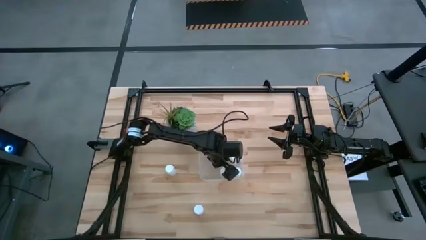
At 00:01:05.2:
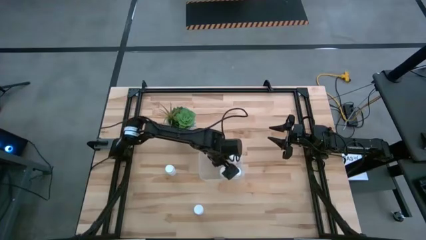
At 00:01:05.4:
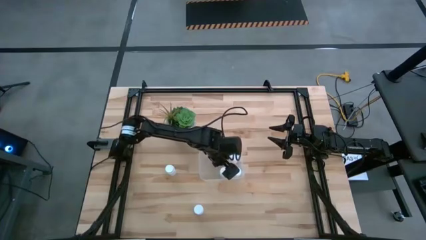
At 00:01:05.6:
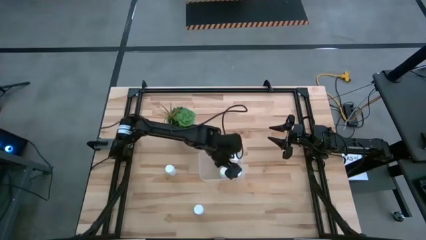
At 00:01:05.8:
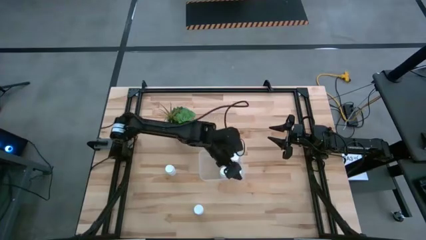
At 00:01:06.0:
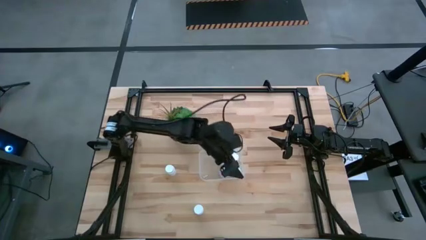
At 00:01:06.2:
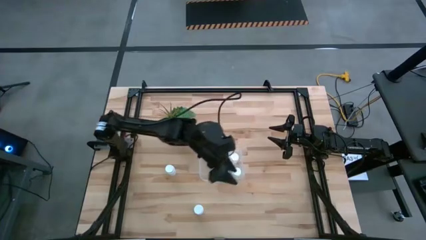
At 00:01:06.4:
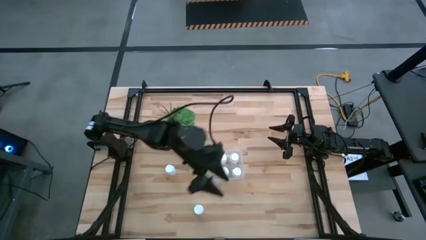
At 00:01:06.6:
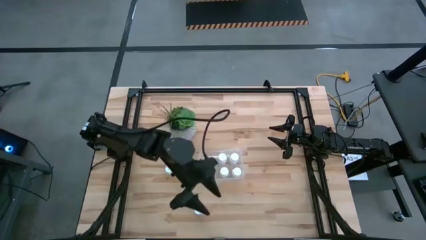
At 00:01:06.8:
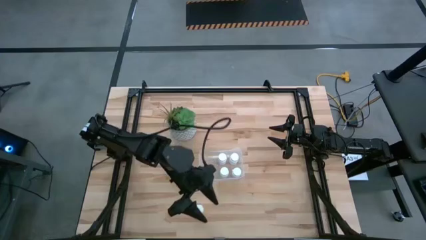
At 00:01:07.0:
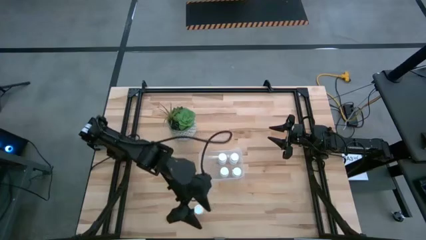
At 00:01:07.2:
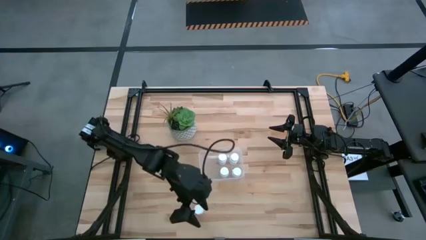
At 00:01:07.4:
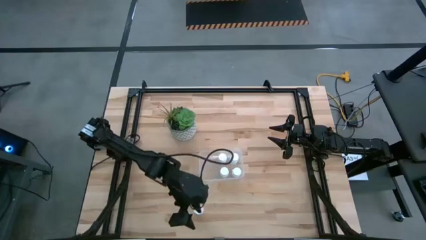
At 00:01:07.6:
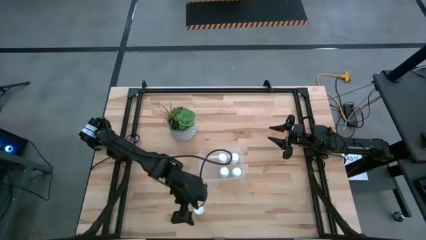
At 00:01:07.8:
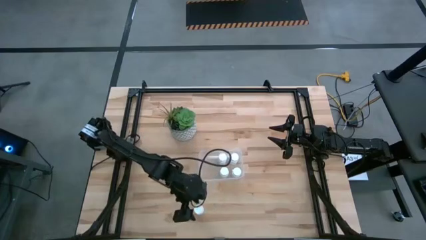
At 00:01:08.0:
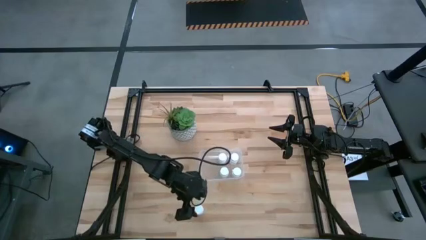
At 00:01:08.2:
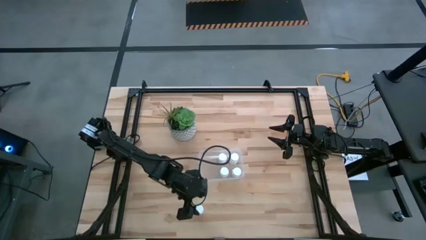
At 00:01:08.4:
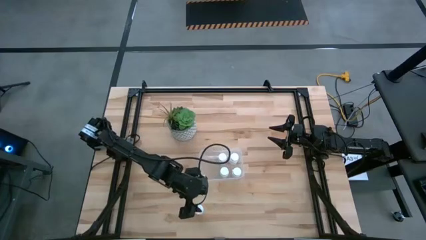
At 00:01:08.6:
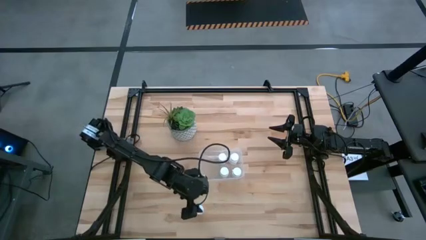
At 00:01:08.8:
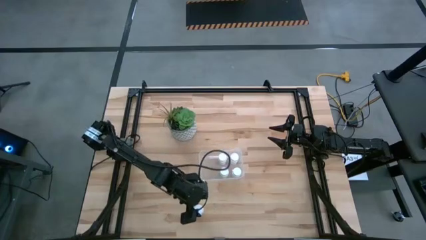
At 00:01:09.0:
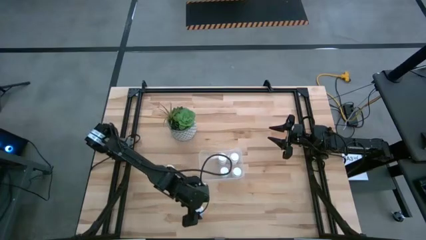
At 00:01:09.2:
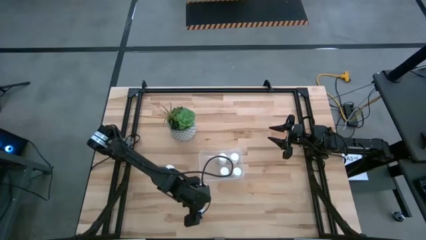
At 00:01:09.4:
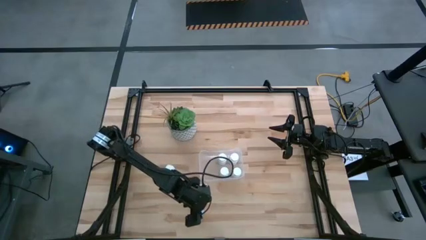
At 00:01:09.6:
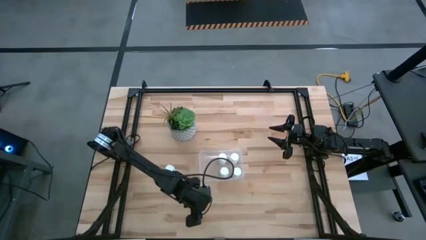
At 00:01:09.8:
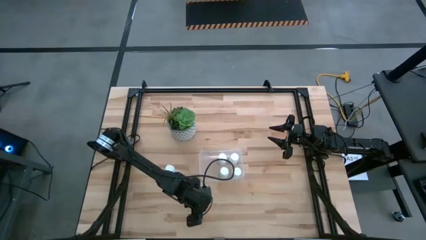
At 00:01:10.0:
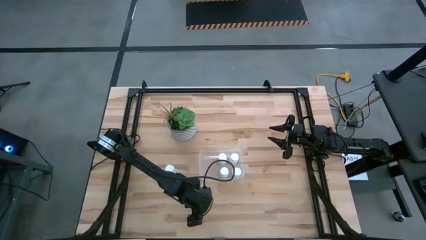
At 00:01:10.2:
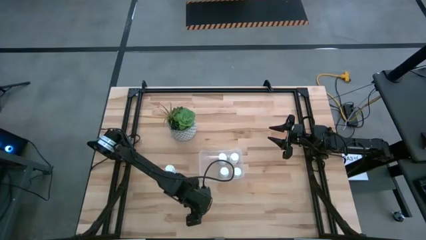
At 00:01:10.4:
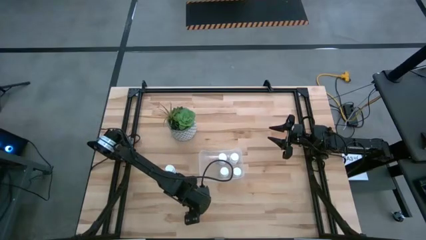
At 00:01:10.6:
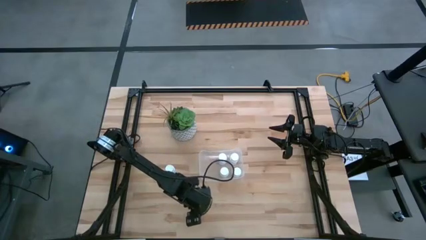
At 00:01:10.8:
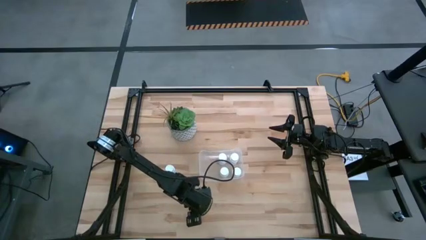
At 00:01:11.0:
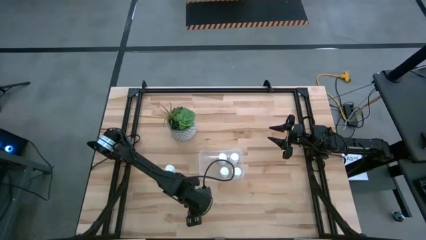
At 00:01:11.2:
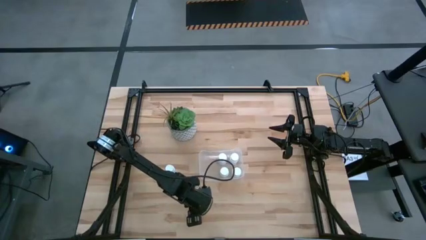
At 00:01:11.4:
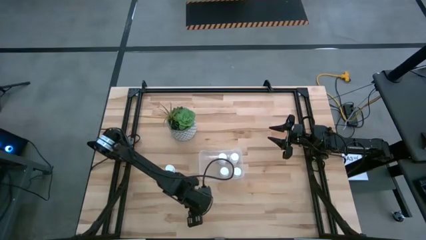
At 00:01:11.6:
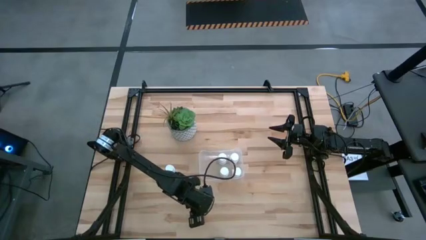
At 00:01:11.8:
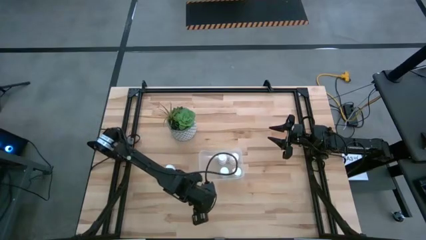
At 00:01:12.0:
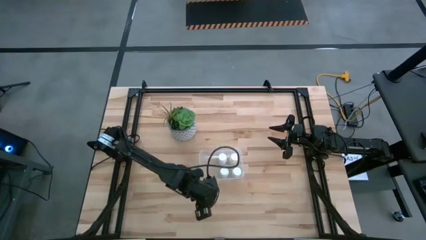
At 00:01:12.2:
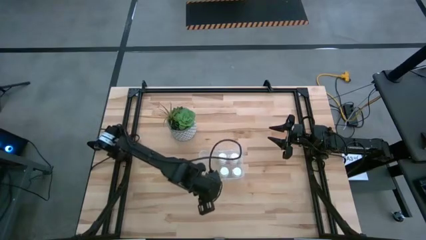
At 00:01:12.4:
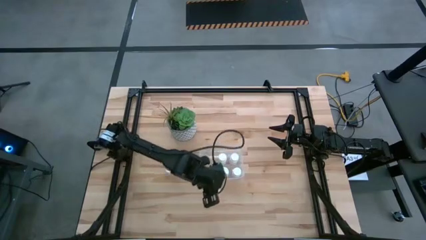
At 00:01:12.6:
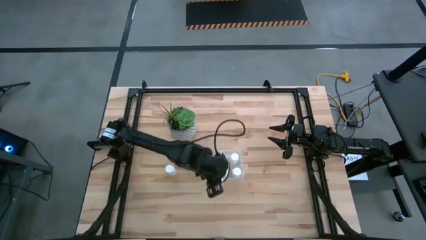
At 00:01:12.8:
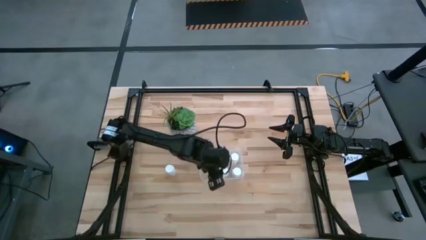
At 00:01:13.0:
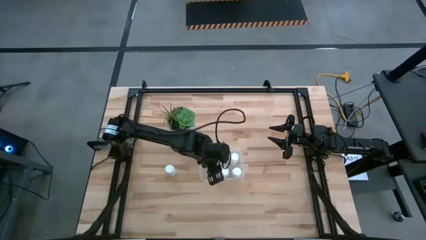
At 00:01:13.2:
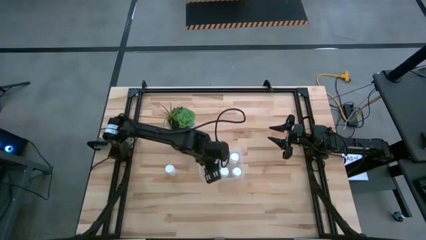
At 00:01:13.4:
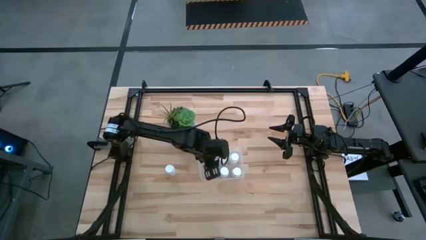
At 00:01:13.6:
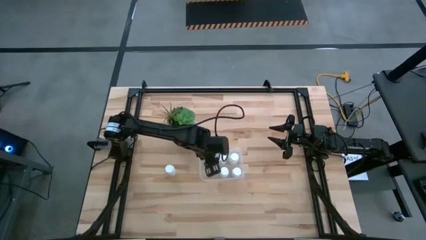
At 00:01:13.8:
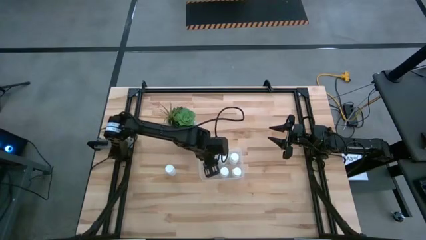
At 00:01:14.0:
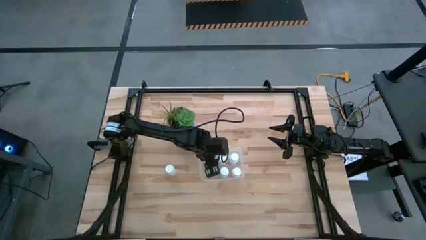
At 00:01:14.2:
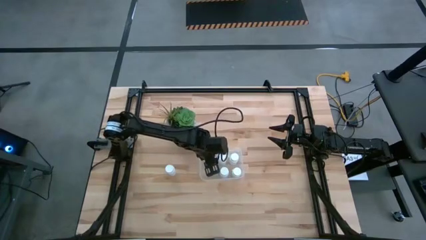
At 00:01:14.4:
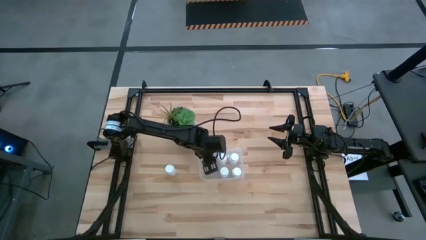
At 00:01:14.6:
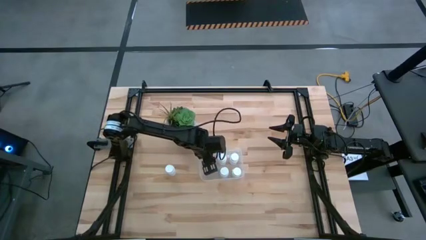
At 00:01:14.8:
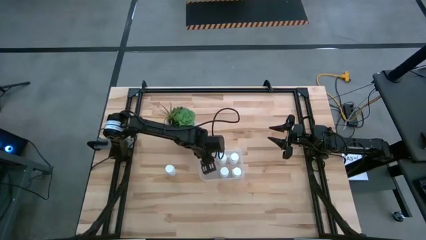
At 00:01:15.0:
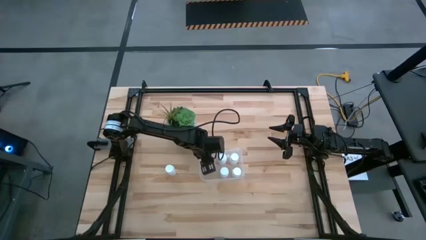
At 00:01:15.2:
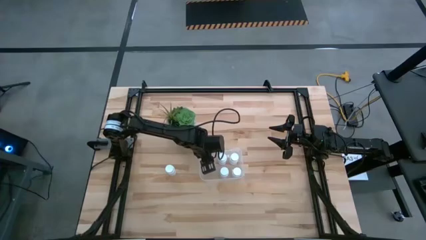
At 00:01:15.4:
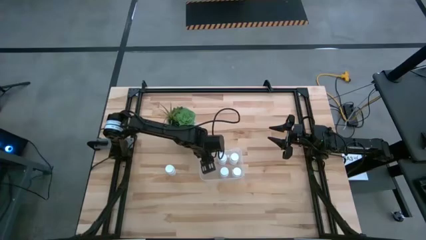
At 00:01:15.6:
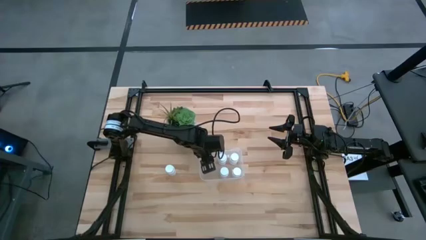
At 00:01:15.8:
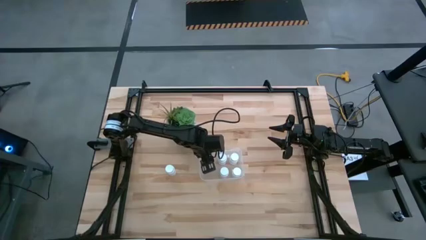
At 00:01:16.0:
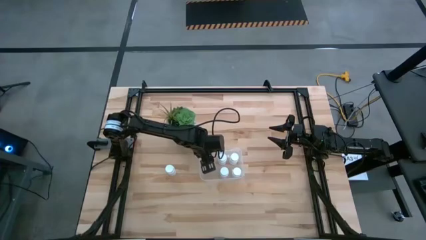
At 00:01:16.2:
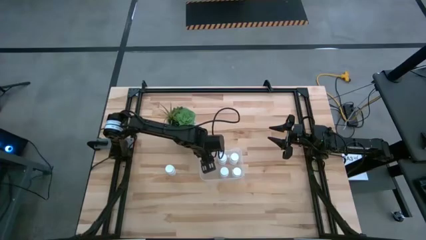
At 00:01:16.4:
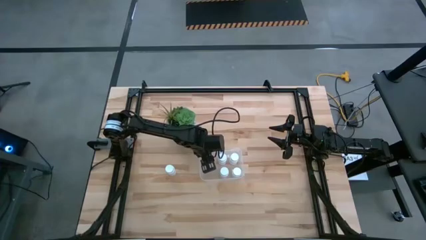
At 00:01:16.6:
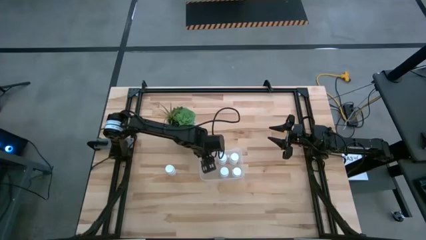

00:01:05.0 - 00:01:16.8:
Task: Pick and place pill bottles into a basket
Put the white pill bottle into the transparent bin
